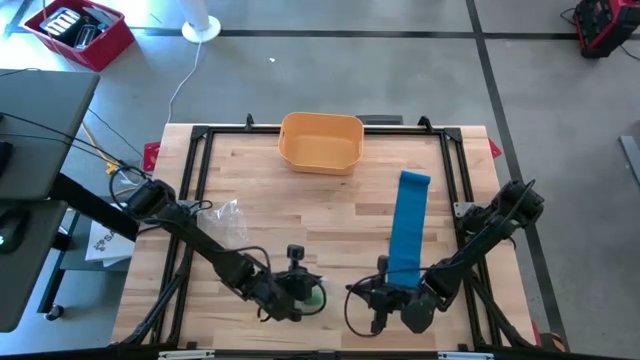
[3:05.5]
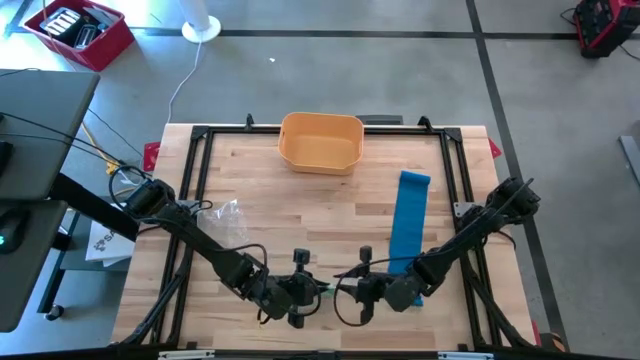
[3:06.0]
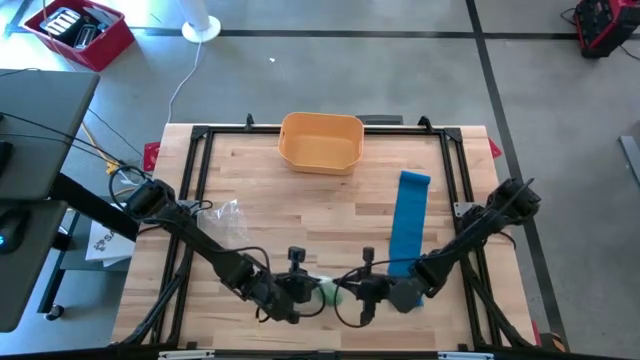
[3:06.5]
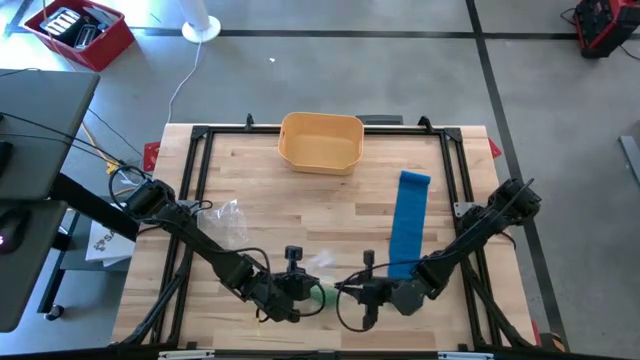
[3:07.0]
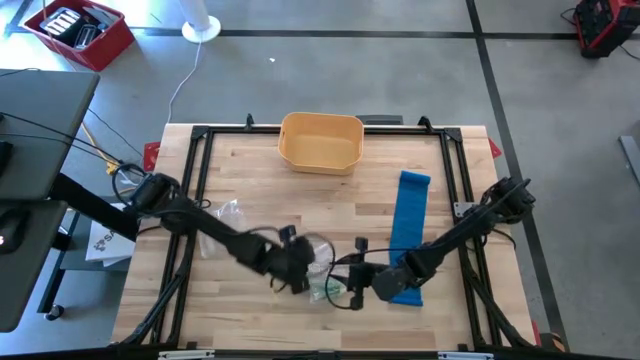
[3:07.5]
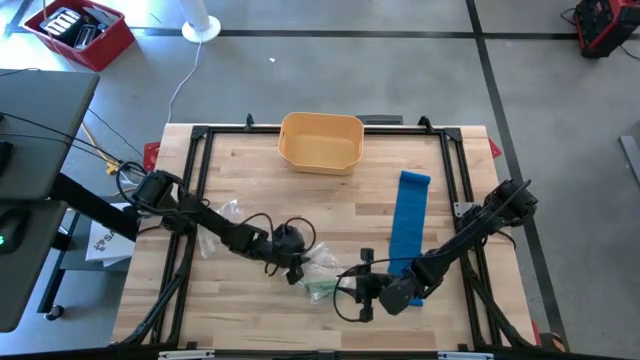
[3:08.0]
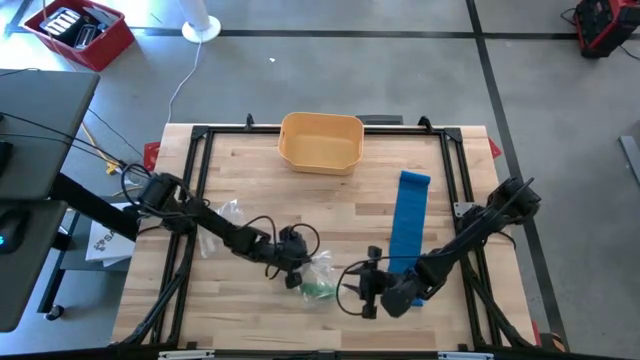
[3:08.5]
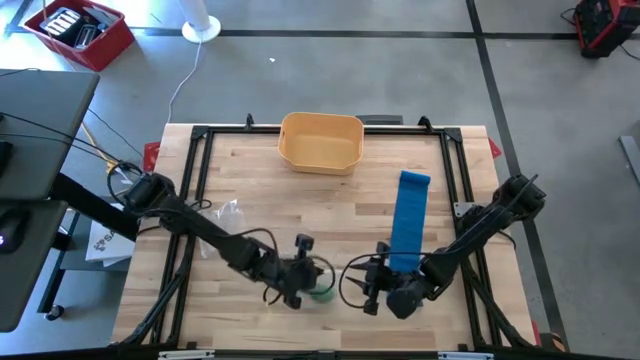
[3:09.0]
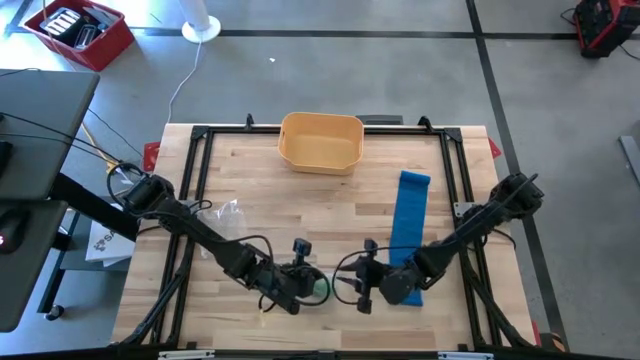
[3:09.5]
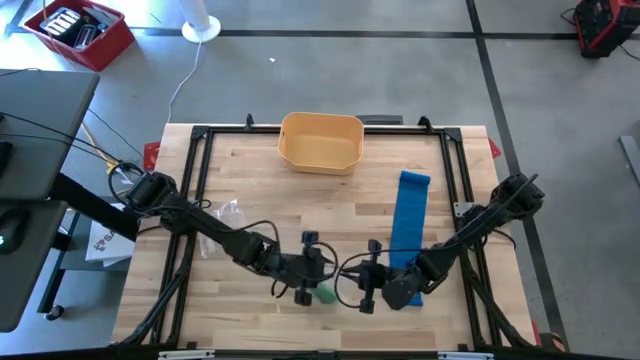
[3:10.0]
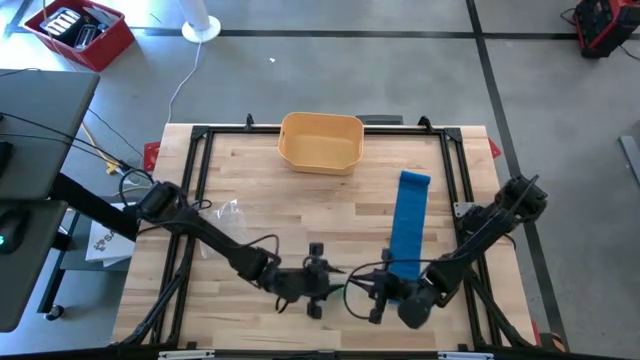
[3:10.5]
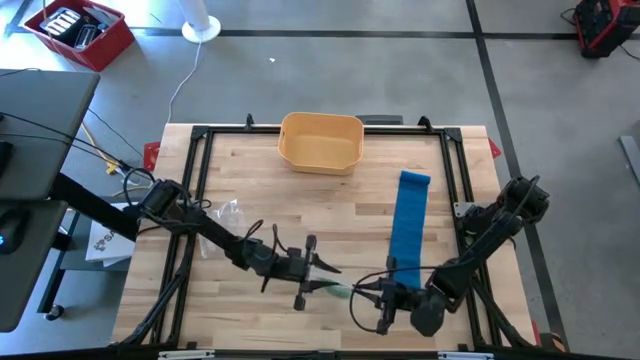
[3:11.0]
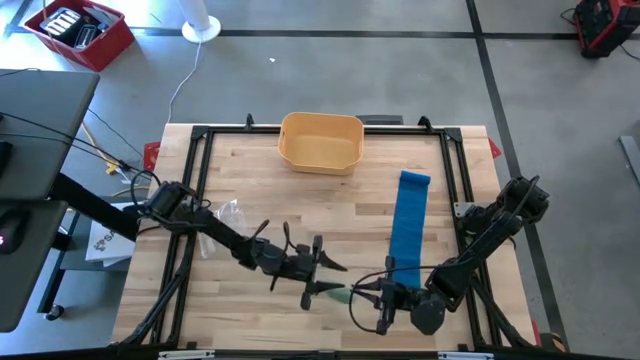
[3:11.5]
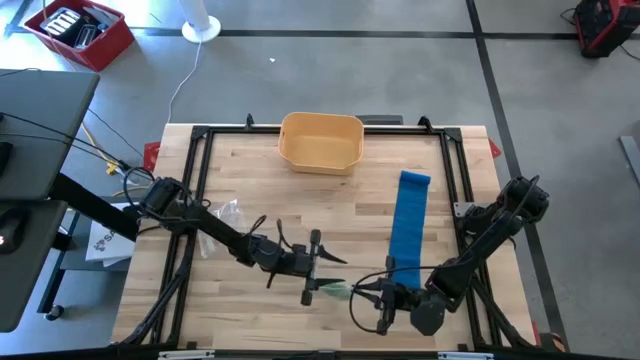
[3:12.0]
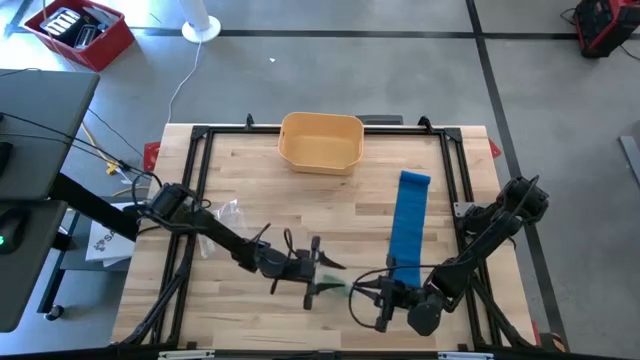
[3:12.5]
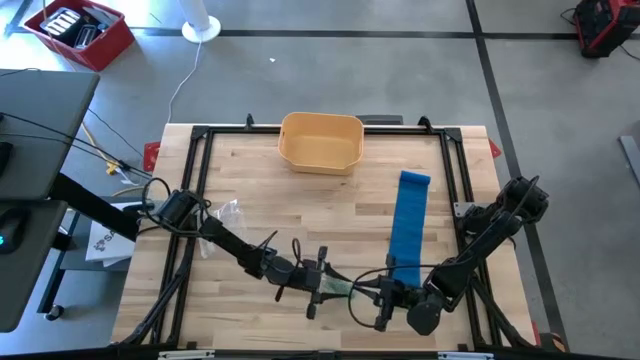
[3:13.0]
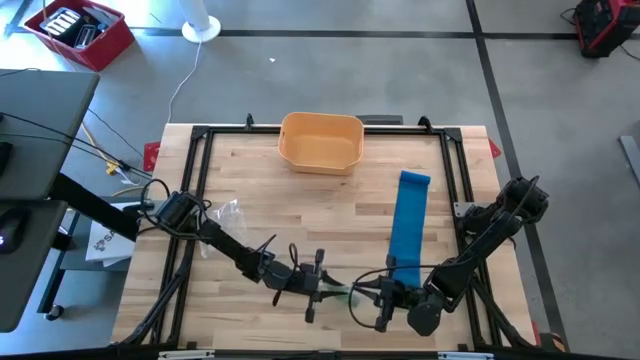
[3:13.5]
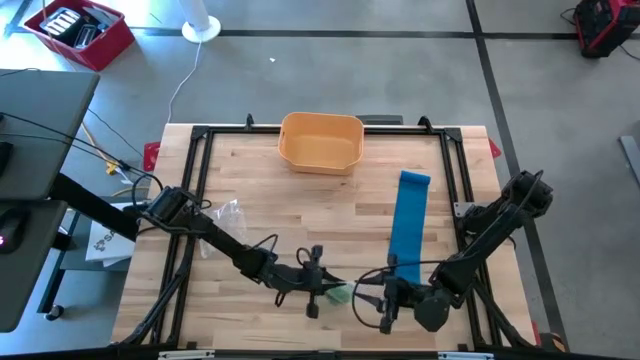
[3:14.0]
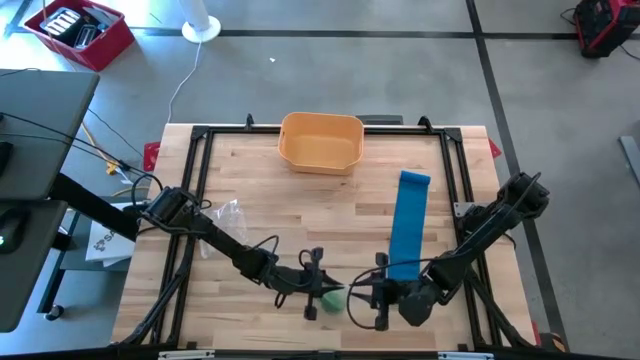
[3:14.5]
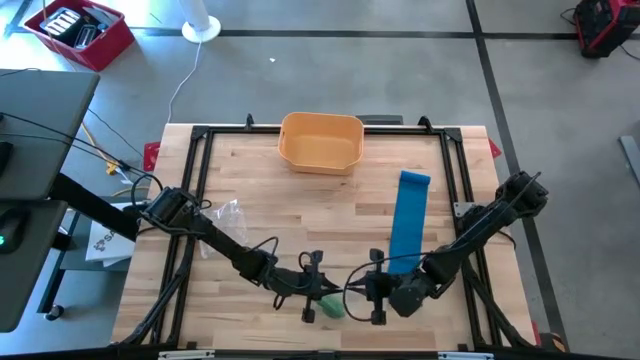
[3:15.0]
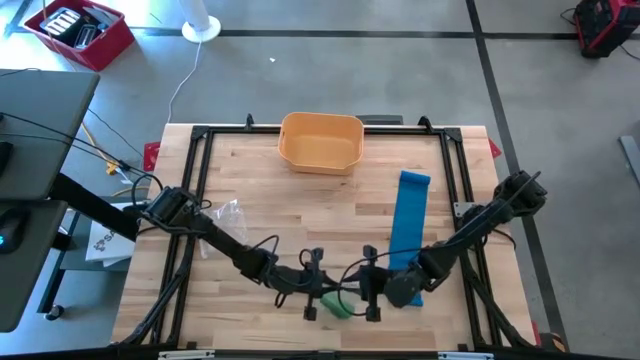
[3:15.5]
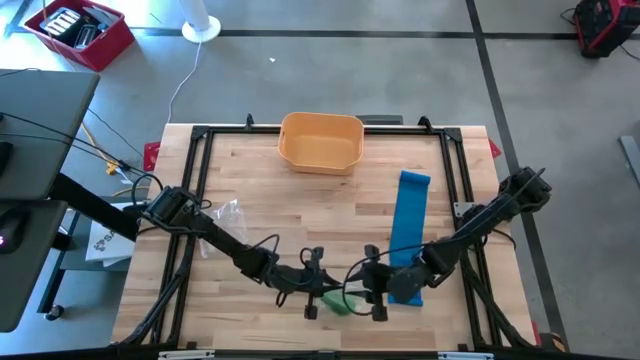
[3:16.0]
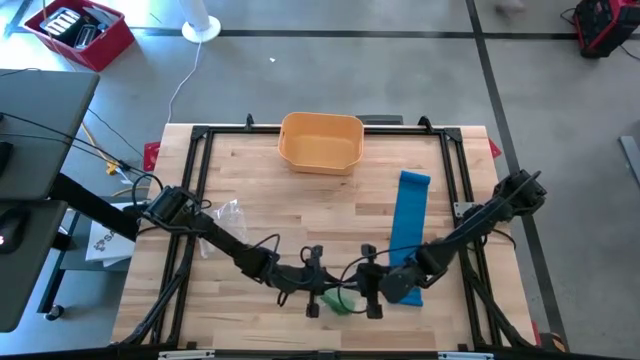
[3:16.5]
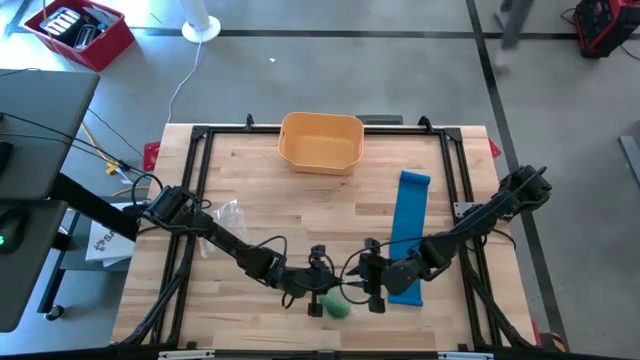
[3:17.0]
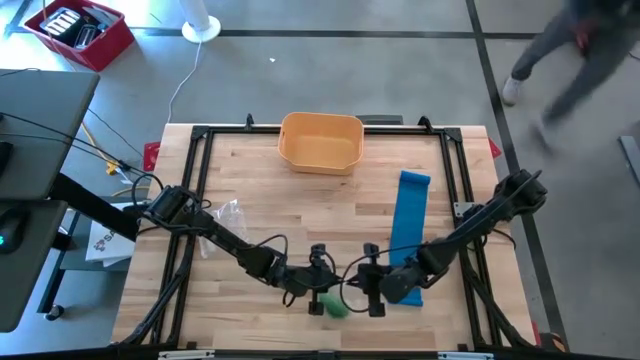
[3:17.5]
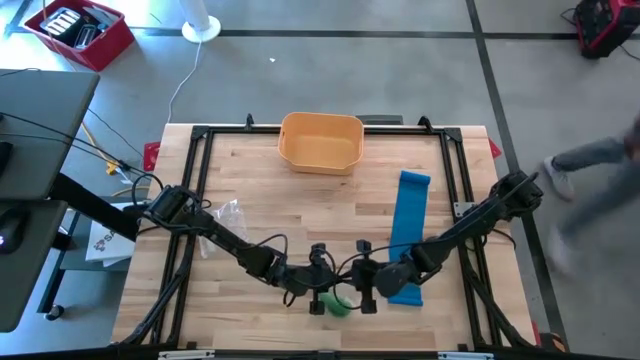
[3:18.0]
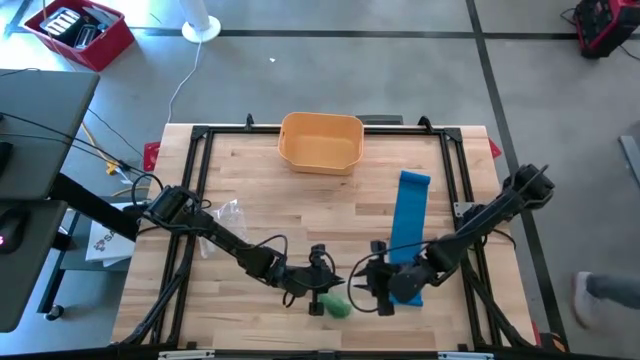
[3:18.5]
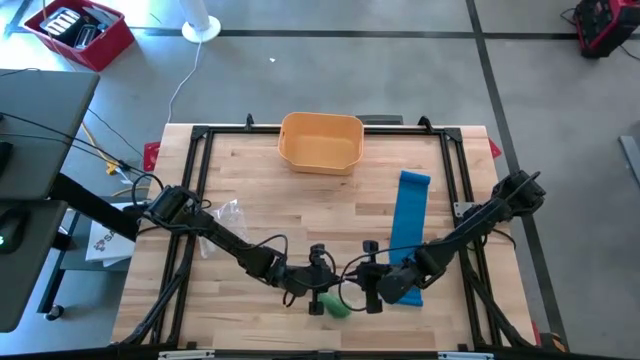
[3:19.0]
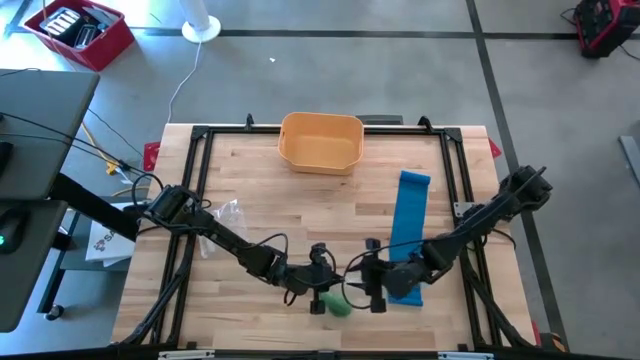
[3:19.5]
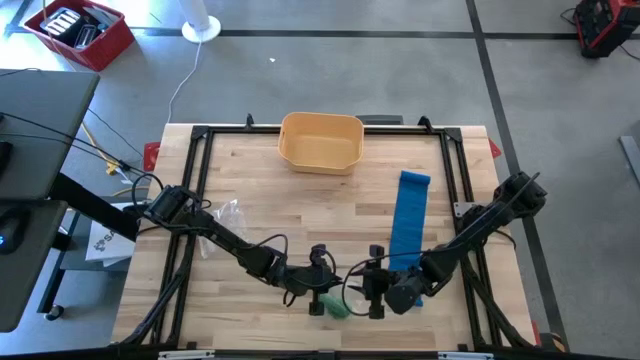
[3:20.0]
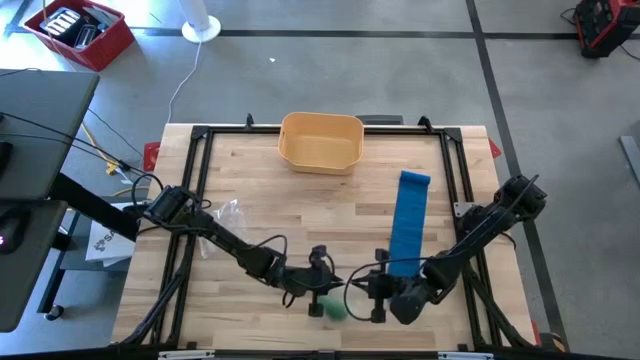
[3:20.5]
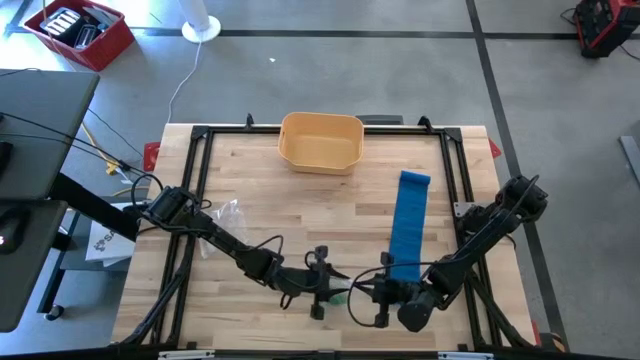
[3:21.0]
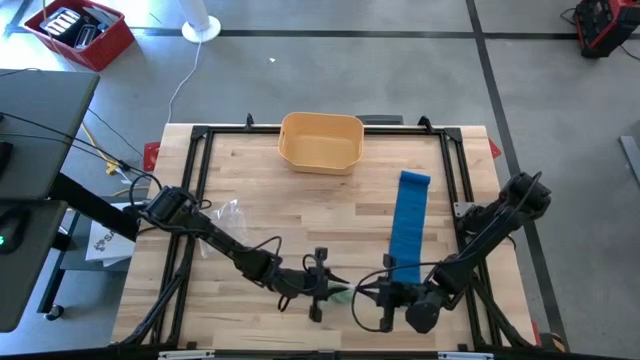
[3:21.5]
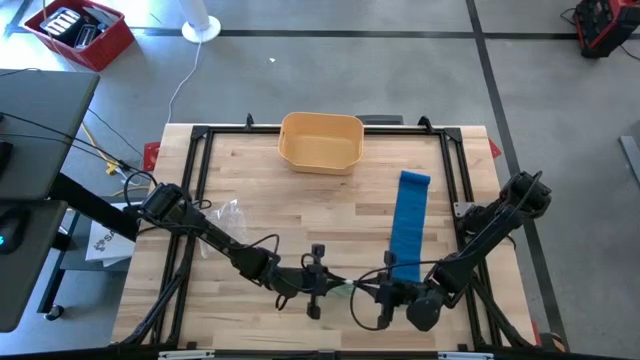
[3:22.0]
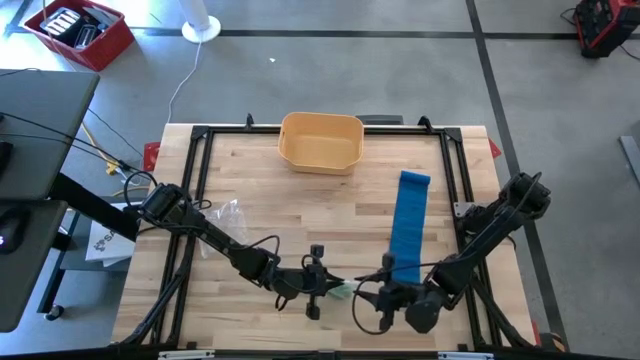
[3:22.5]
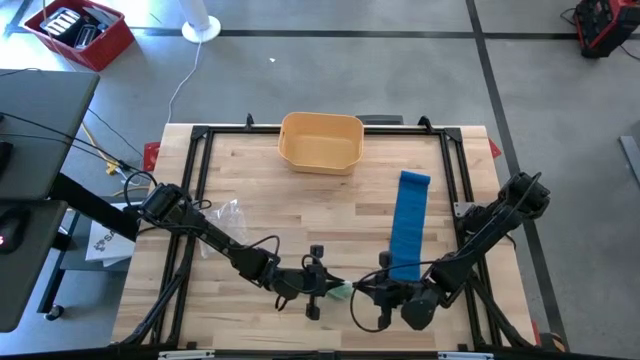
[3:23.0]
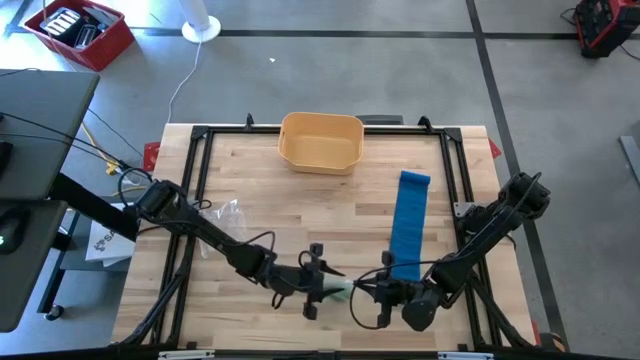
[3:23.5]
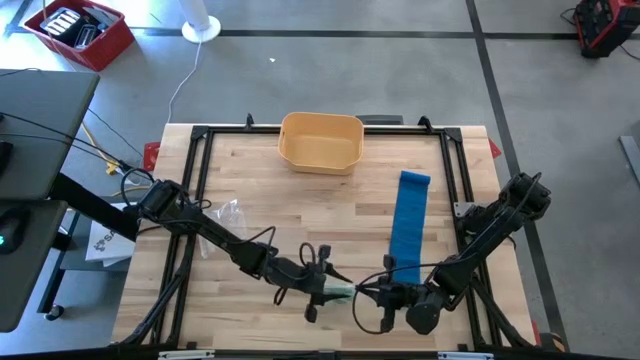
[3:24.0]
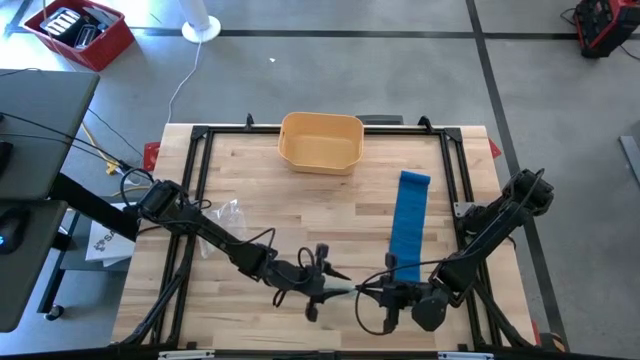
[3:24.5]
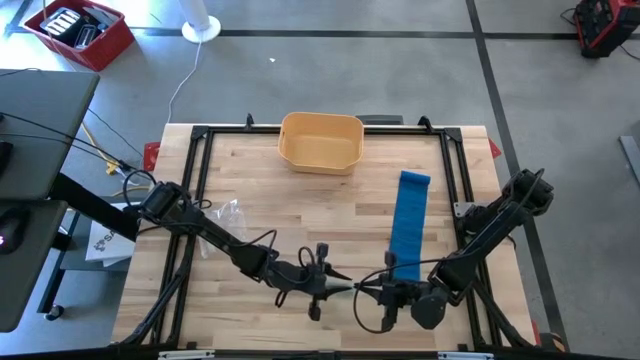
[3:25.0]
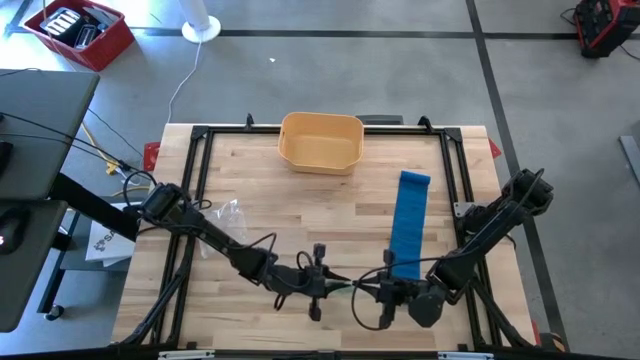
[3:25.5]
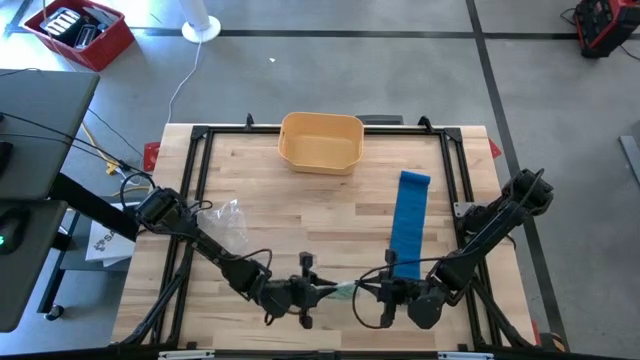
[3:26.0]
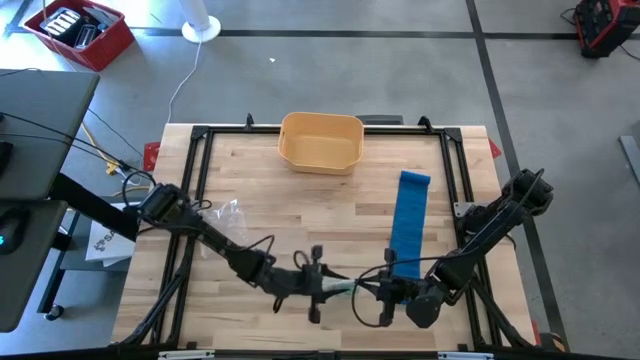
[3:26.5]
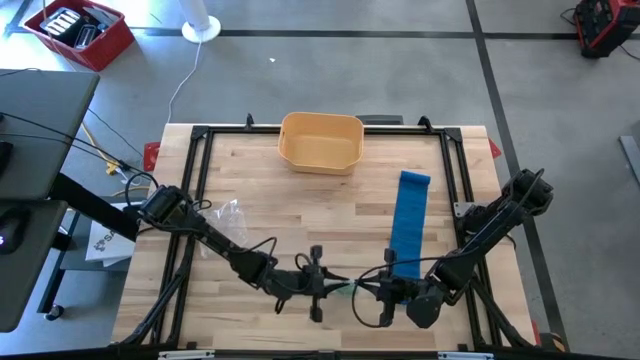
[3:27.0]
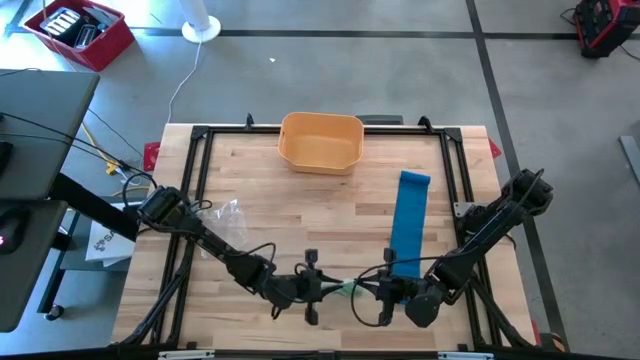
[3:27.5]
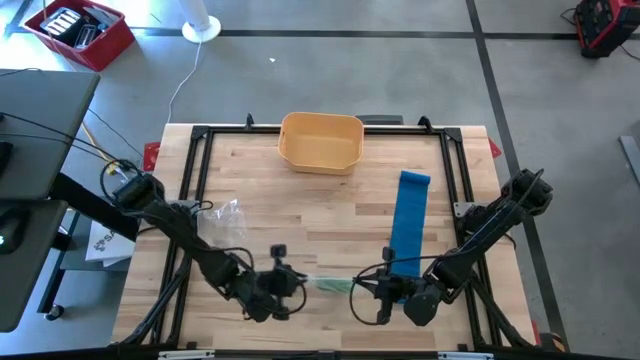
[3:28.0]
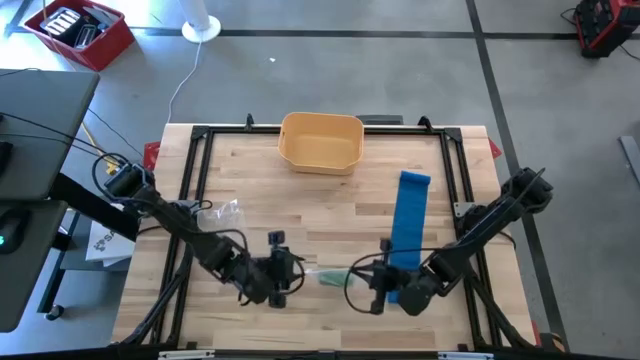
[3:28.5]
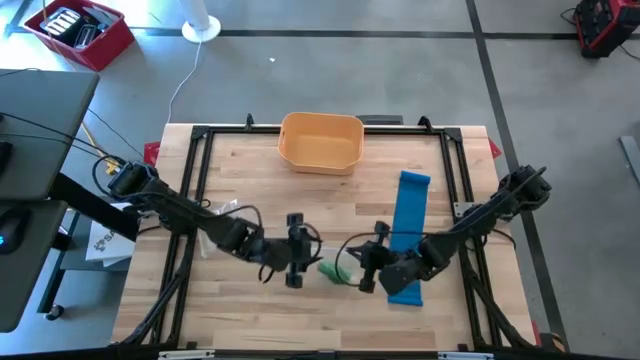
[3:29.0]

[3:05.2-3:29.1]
Task: Roll bandage
Close the transparent zip bag
